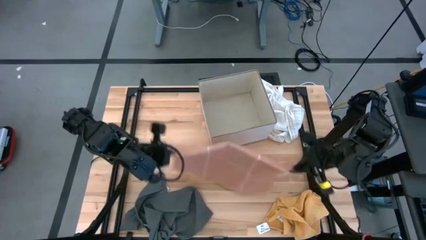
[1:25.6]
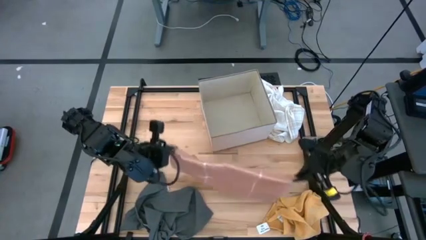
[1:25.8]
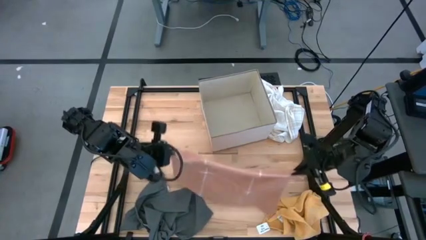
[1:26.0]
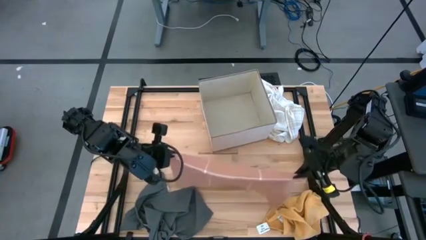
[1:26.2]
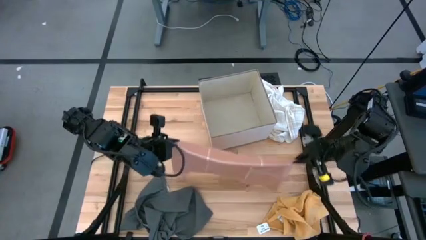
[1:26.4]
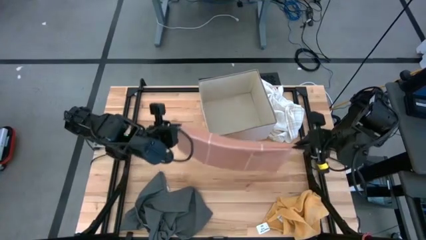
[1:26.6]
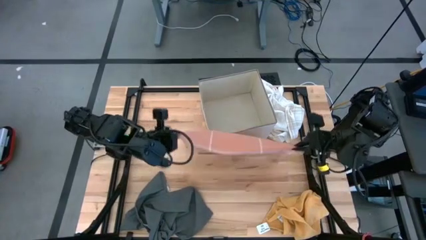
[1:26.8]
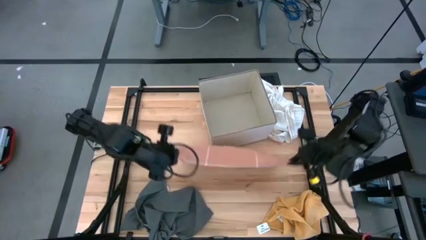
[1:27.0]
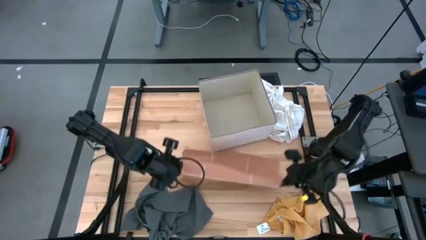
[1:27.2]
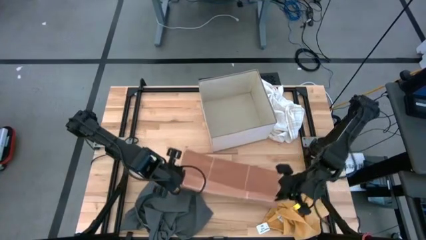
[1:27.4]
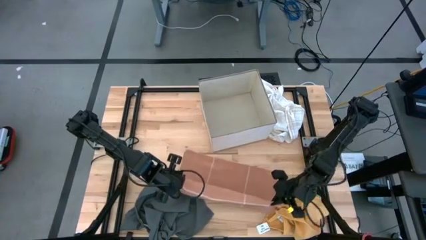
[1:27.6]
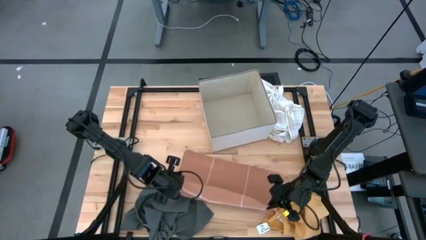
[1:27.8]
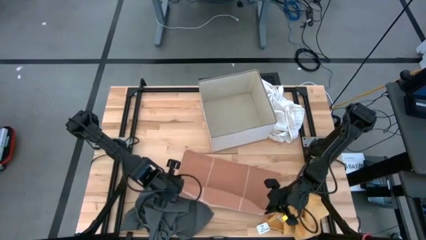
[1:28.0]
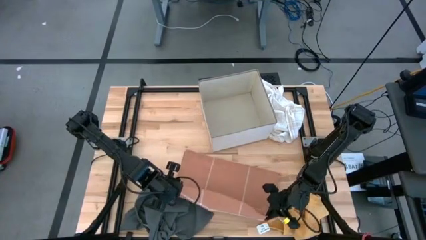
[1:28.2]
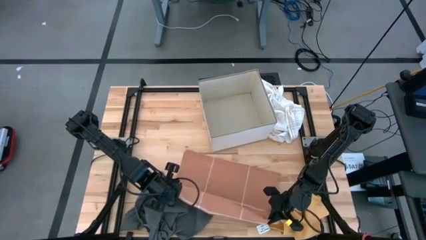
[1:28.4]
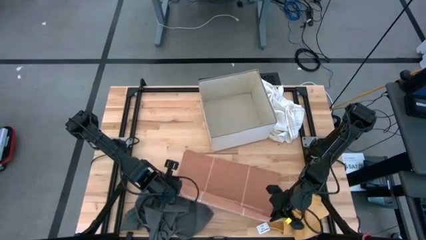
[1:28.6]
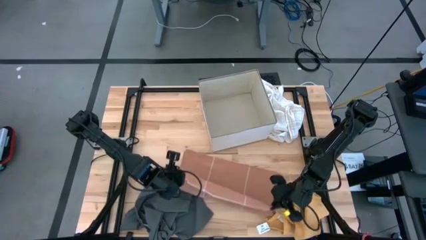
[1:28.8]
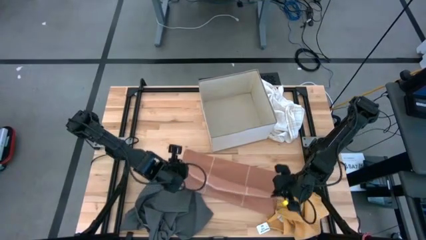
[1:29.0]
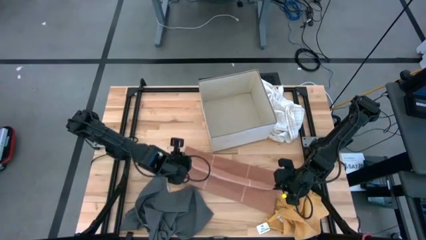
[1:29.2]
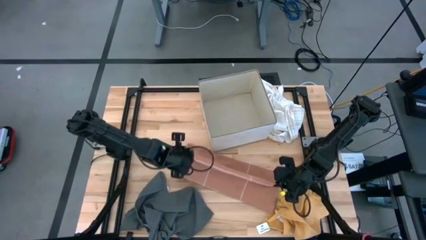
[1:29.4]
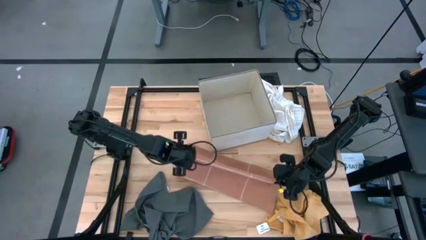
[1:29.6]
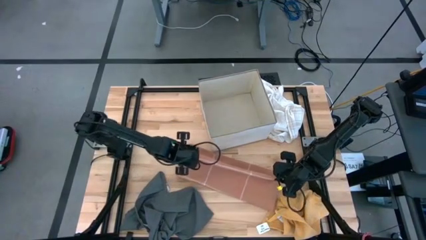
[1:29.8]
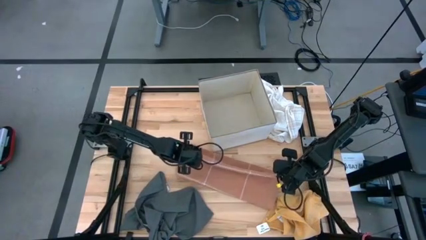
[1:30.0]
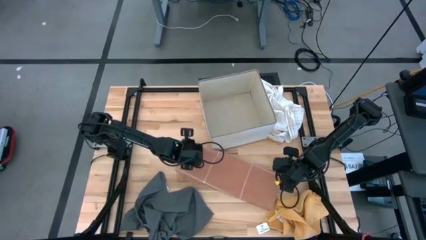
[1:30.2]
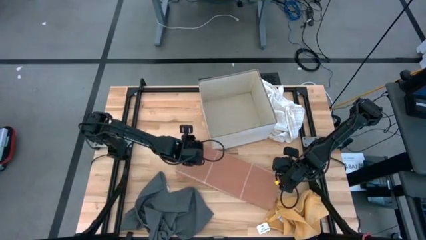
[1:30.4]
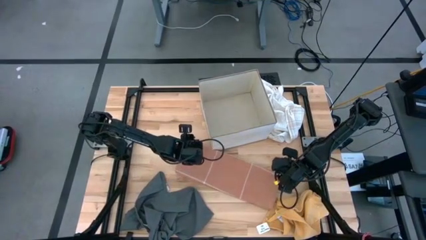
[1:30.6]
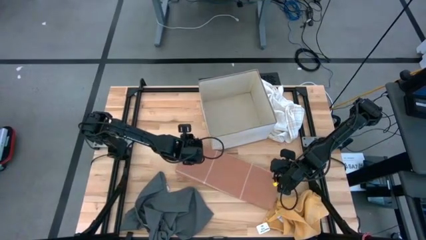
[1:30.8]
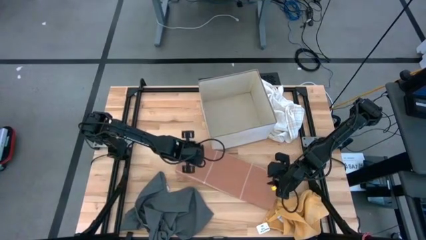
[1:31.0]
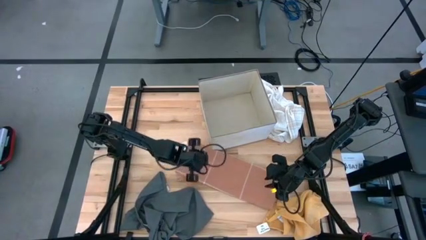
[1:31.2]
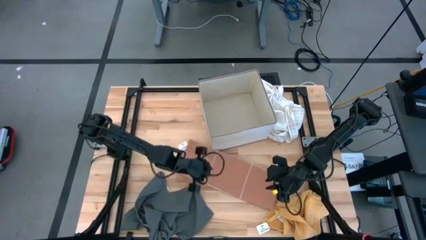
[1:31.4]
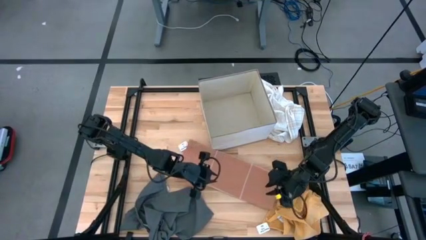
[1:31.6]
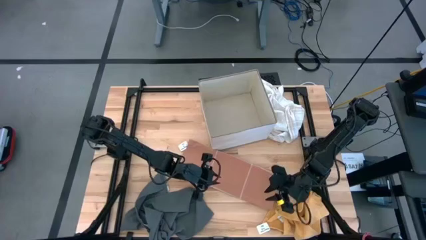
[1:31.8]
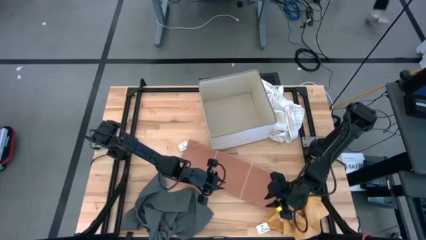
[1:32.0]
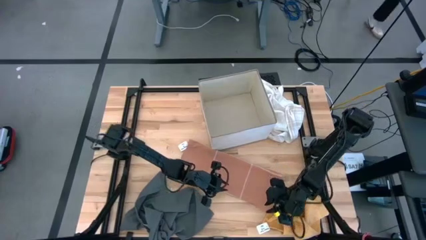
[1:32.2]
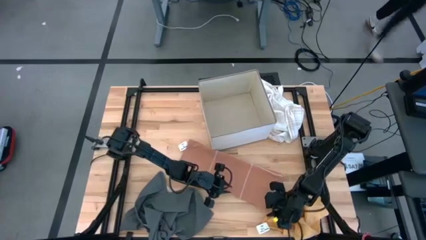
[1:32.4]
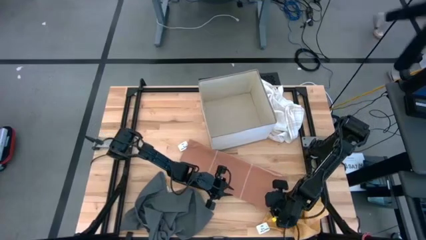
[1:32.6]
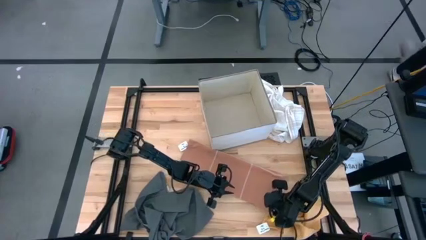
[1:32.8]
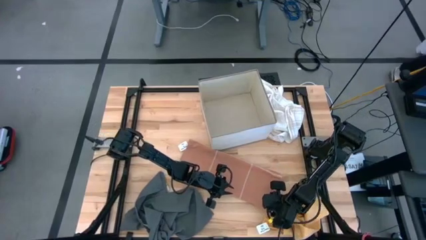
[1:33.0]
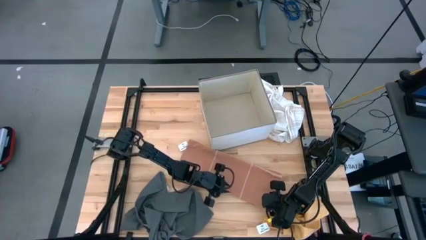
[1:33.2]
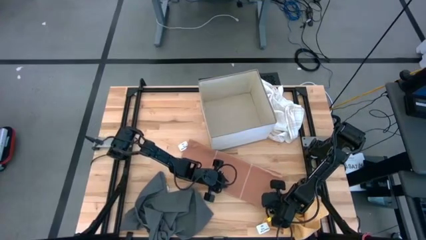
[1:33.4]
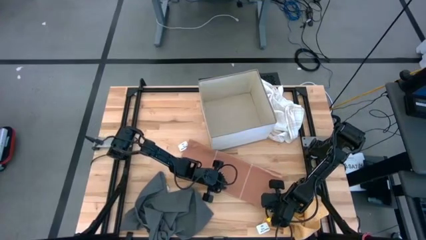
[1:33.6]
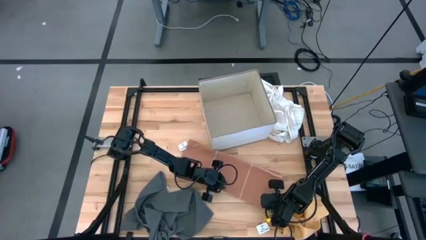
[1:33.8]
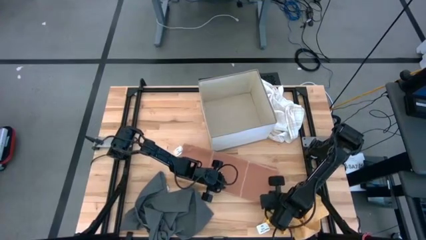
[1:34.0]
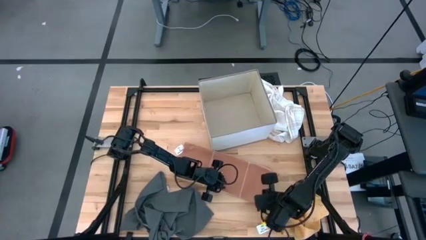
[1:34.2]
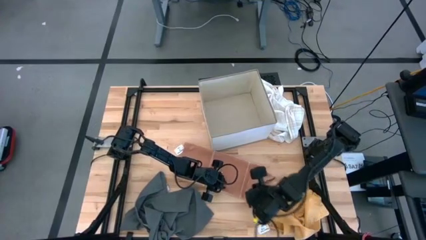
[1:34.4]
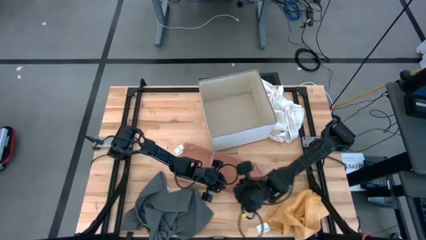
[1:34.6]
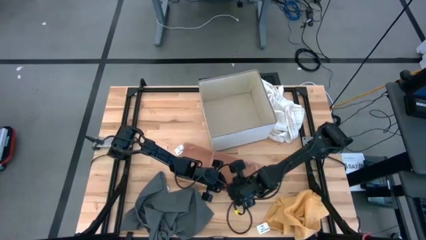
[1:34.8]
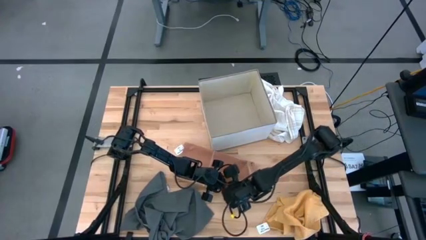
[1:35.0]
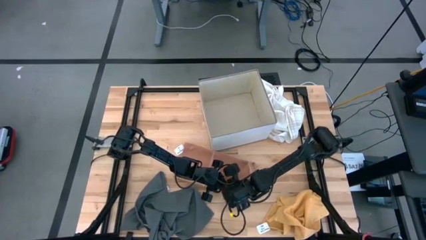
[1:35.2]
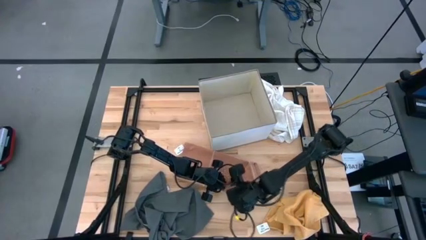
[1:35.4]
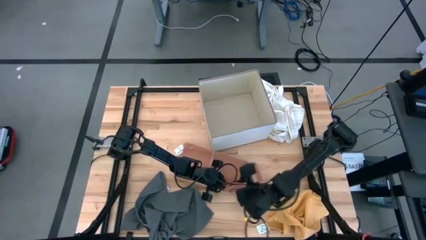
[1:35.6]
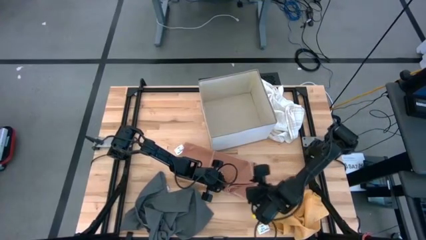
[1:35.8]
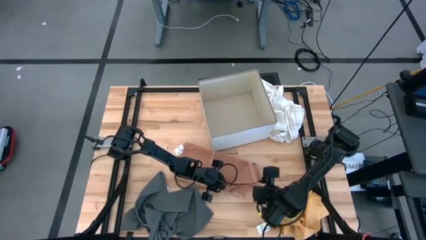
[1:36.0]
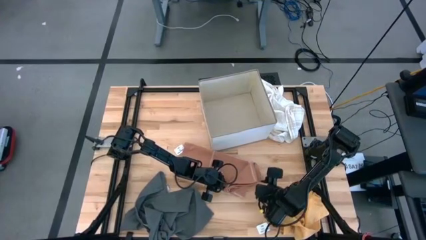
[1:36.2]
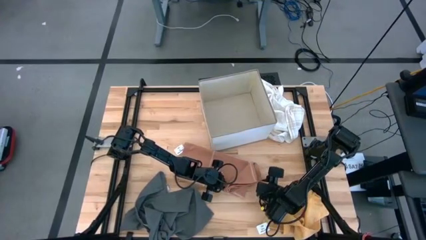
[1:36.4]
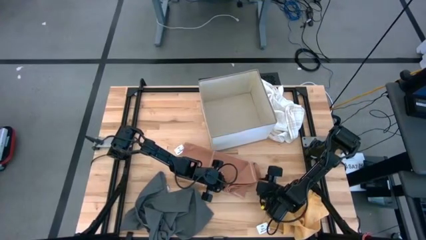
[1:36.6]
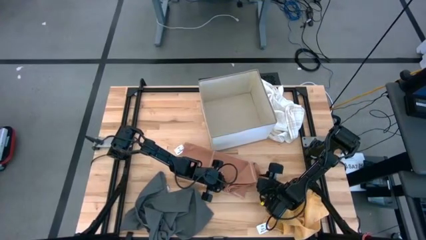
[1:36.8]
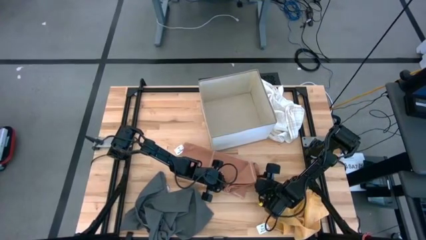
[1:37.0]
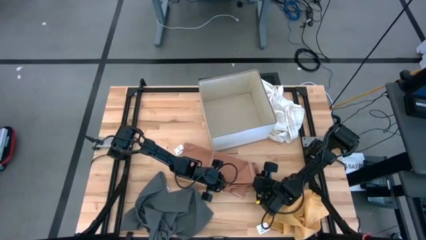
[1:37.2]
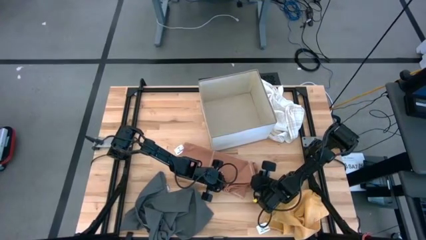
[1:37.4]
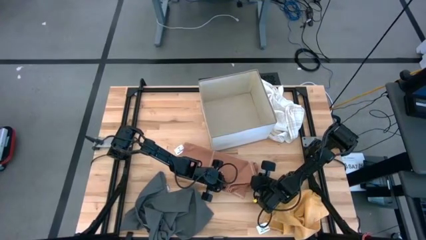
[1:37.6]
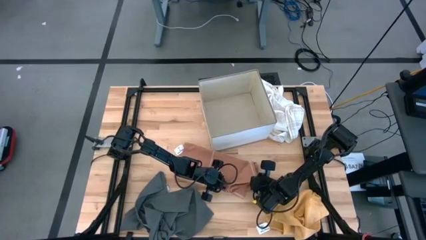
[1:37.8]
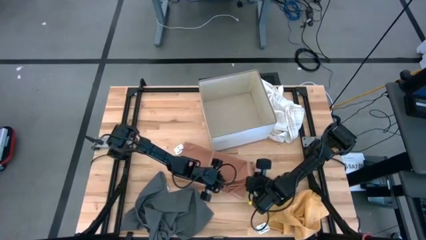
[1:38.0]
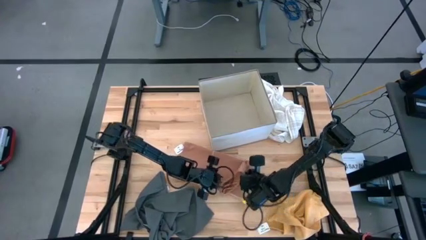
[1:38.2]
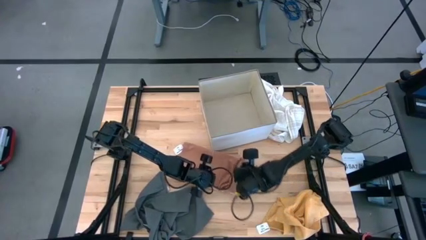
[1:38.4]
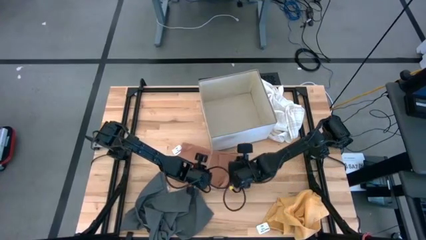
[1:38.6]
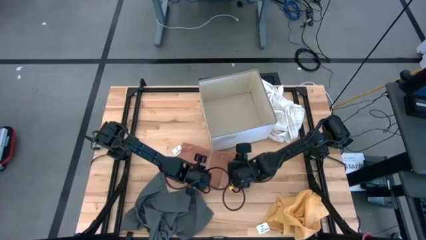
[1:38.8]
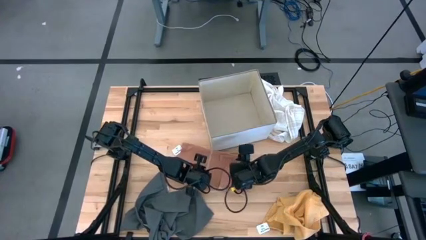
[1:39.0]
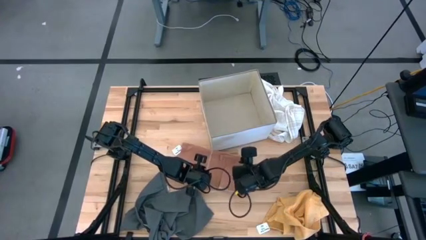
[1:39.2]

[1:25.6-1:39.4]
Task: Fold towel
Fold the brown towel
